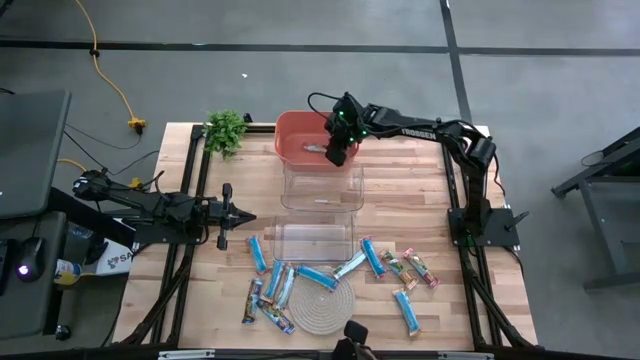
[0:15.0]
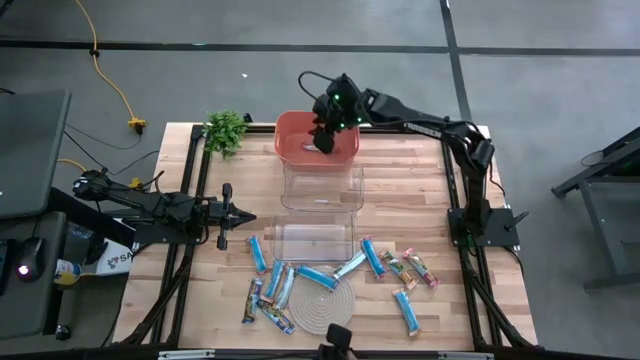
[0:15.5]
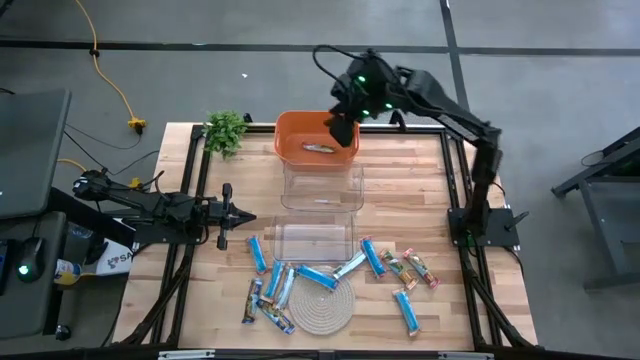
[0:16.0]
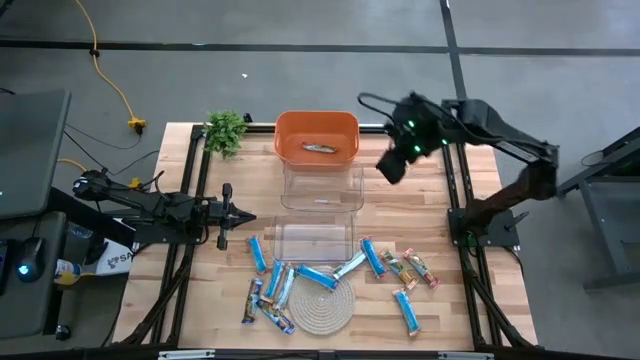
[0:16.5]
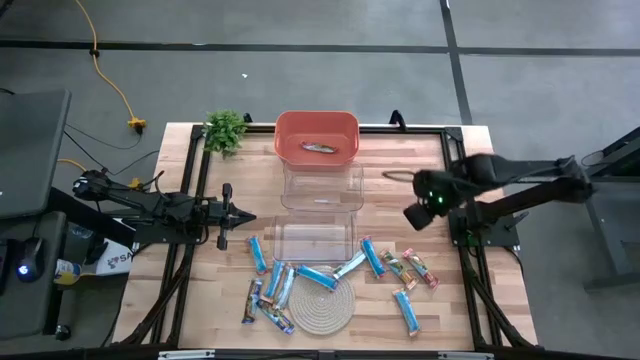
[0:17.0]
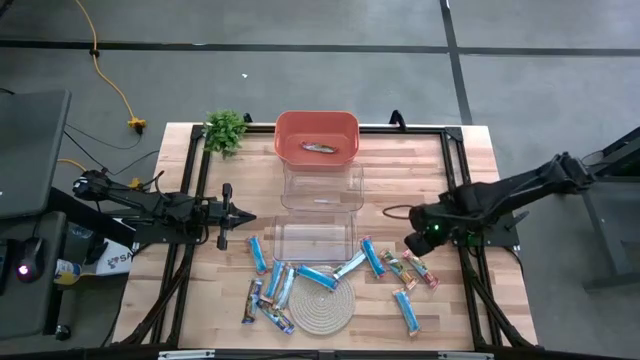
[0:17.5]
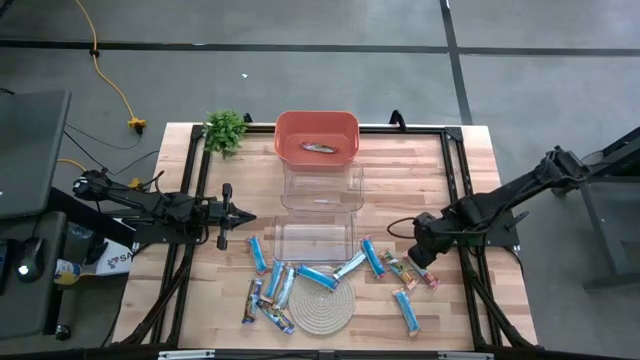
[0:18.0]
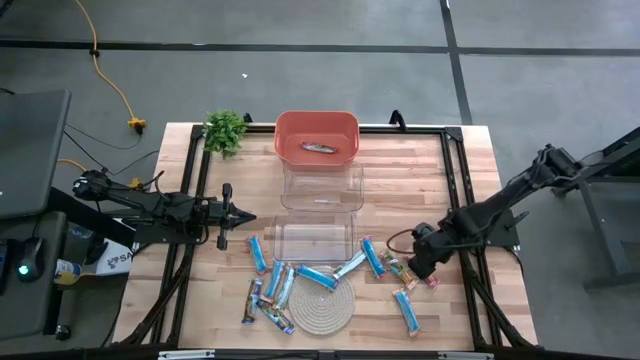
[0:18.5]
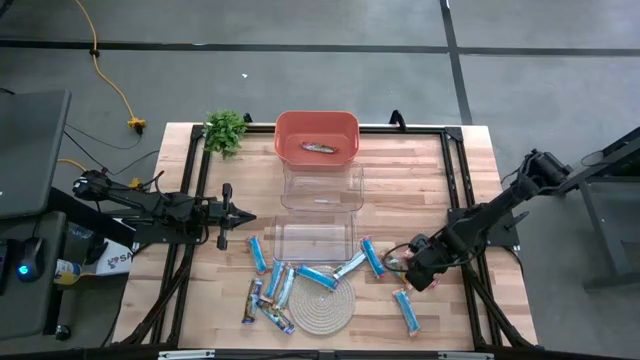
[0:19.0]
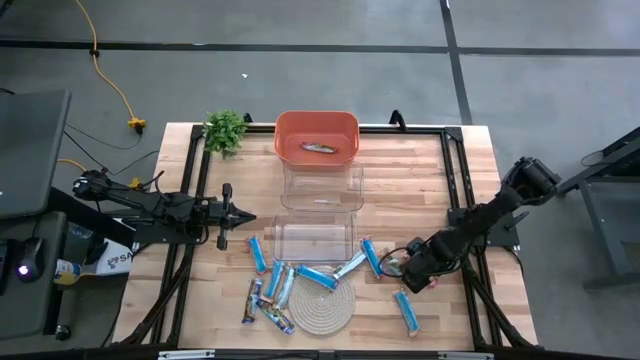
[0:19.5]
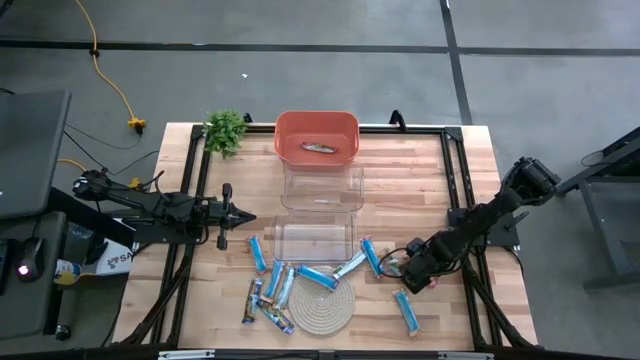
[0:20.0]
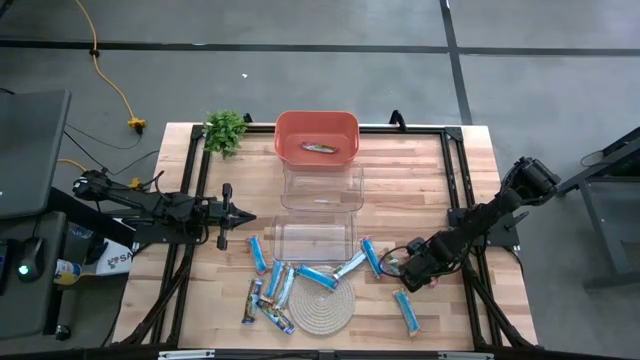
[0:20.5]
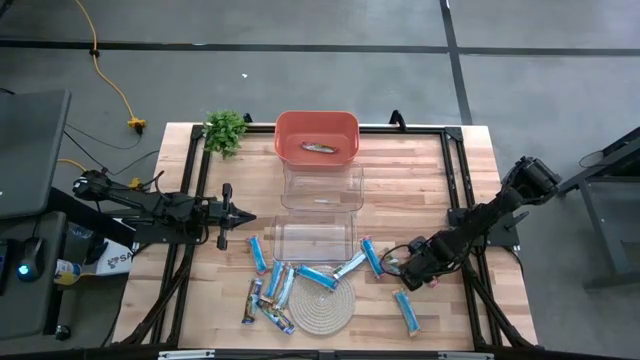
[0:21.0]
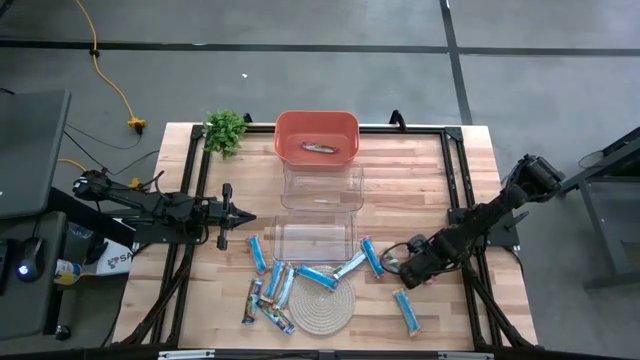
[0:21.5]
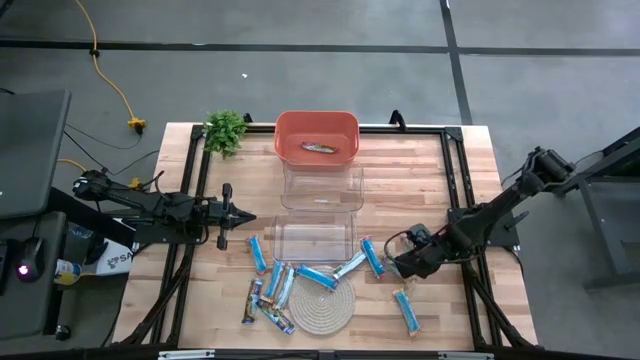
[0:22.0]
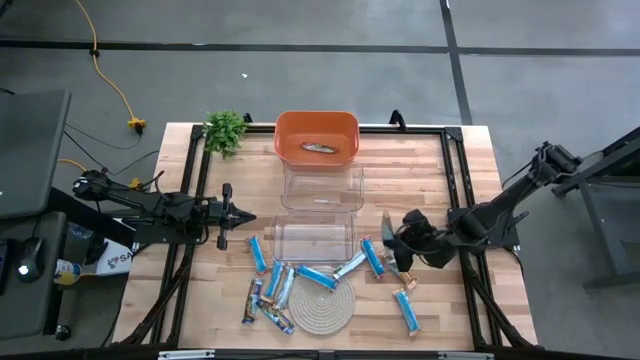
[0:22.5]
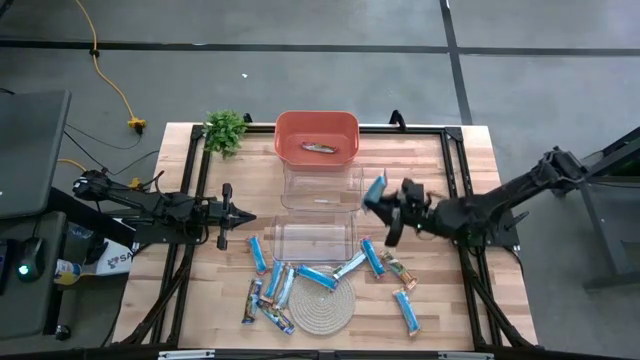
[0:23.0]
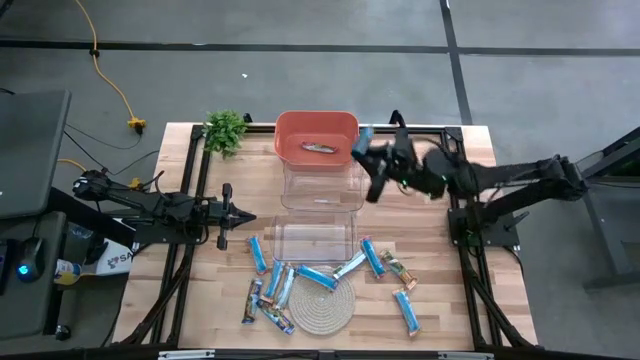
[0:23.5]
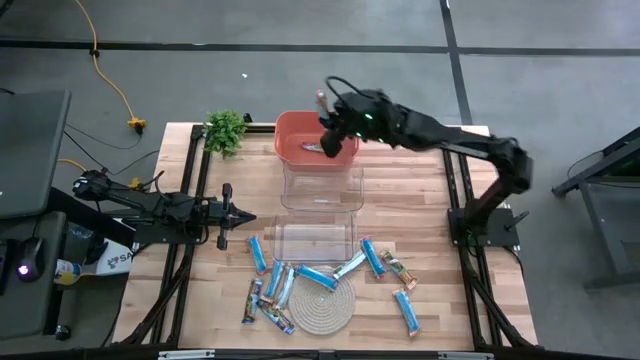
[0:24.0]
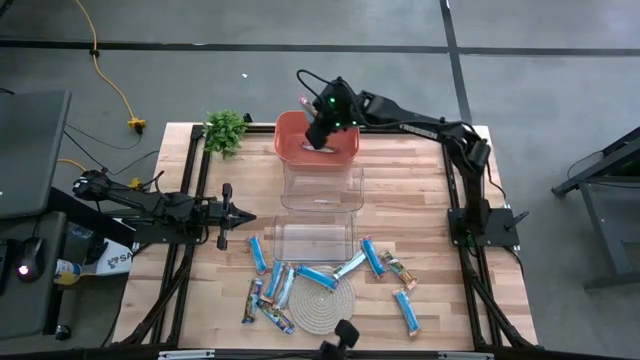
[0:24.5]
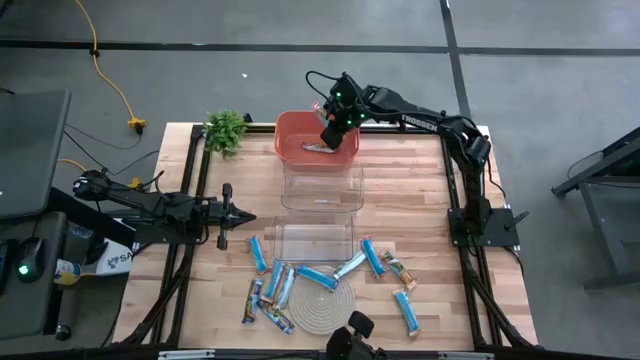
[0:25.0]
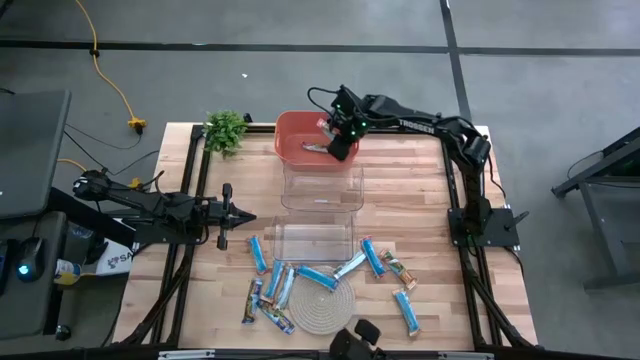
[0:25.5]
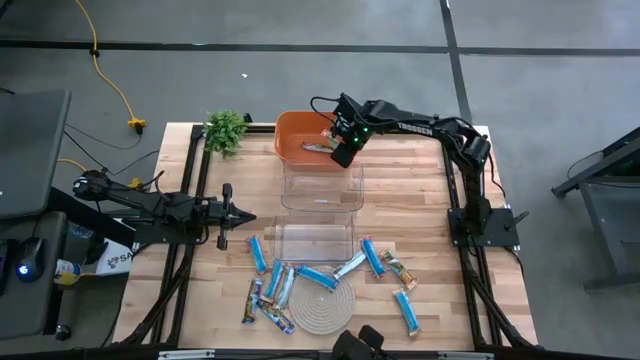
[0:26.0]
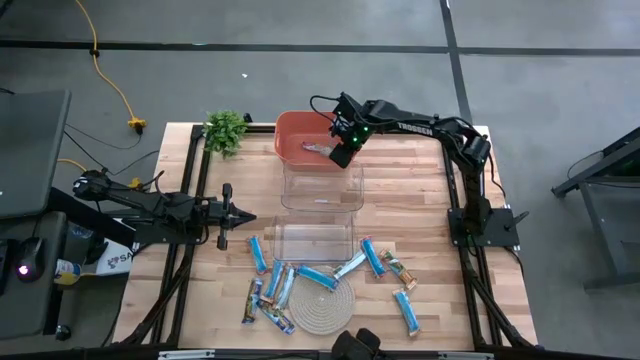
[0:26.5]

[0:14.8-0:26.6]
Task: Pick and place Granola Bars by type
Put the red granola bar into the orange bin

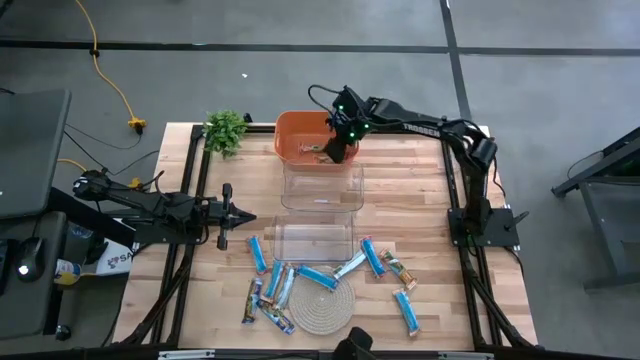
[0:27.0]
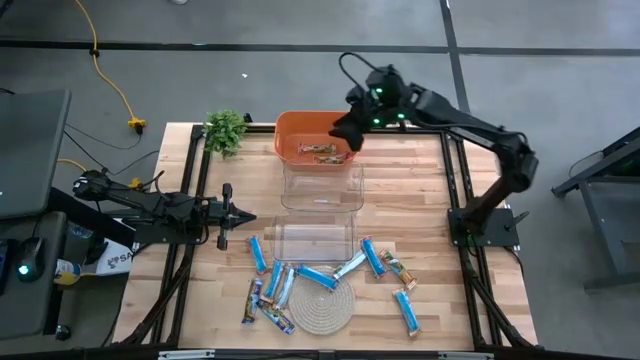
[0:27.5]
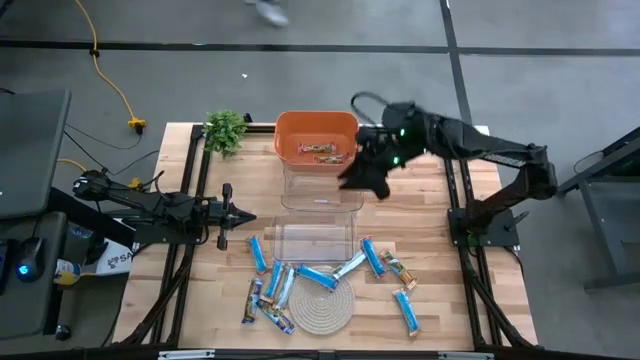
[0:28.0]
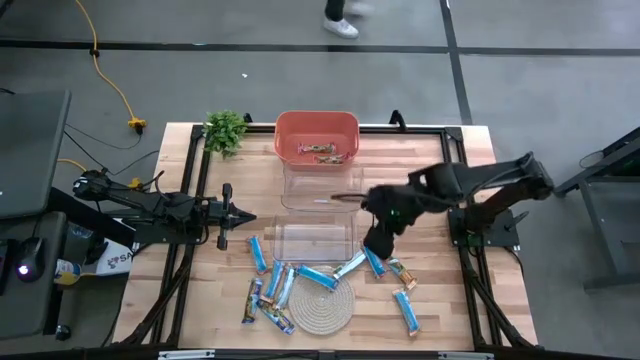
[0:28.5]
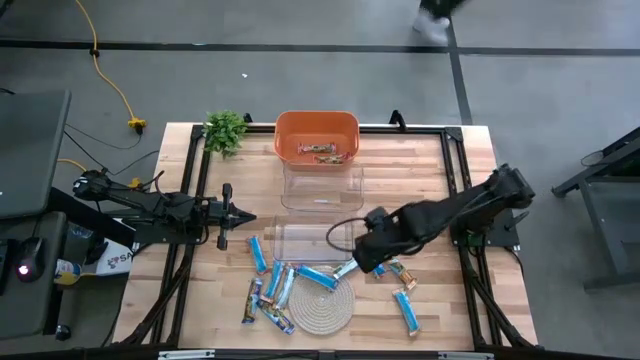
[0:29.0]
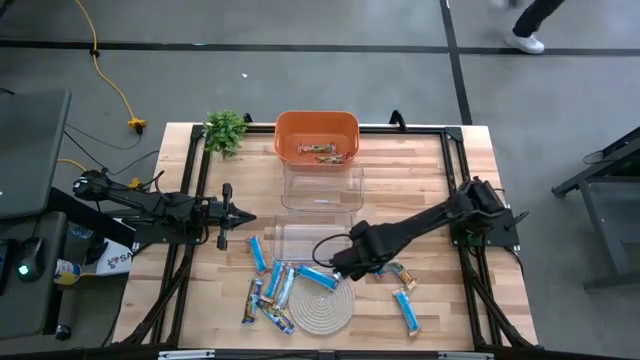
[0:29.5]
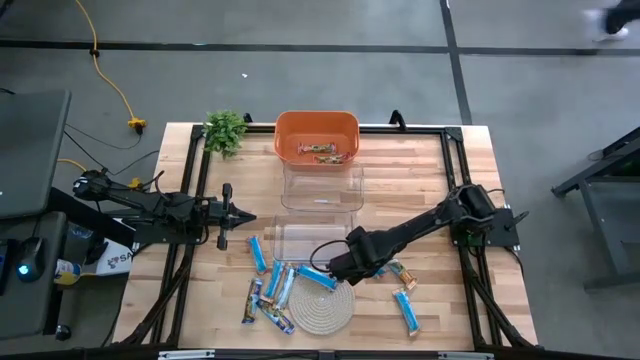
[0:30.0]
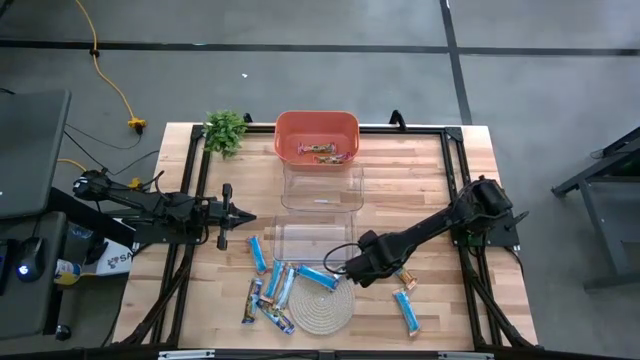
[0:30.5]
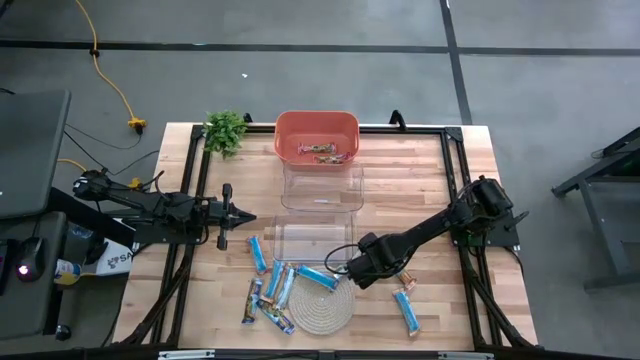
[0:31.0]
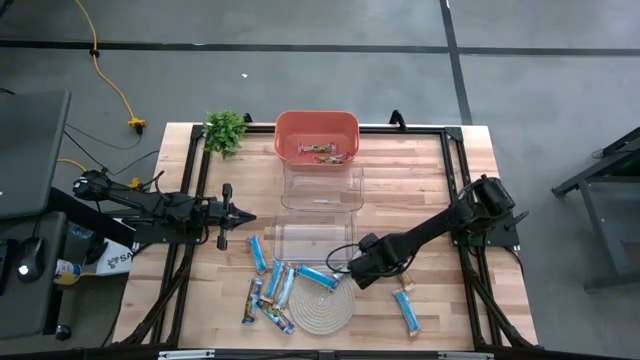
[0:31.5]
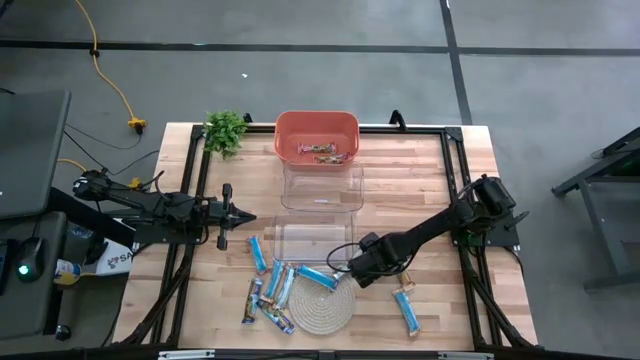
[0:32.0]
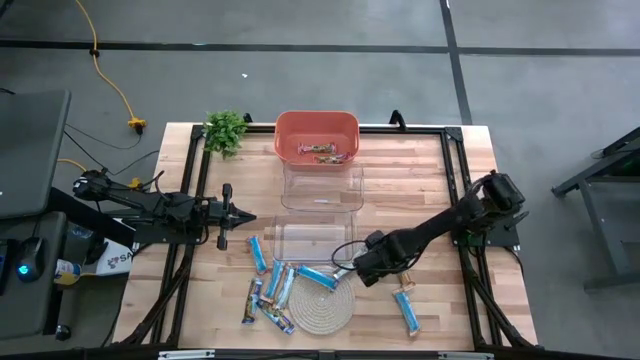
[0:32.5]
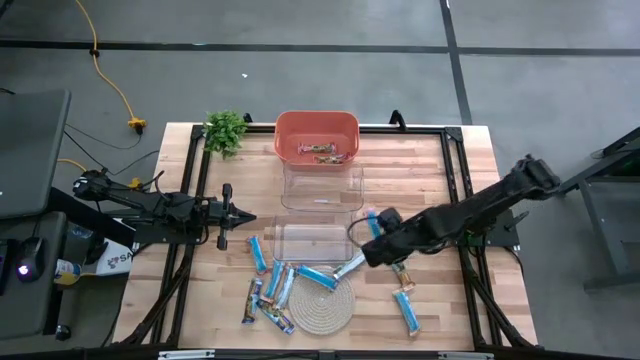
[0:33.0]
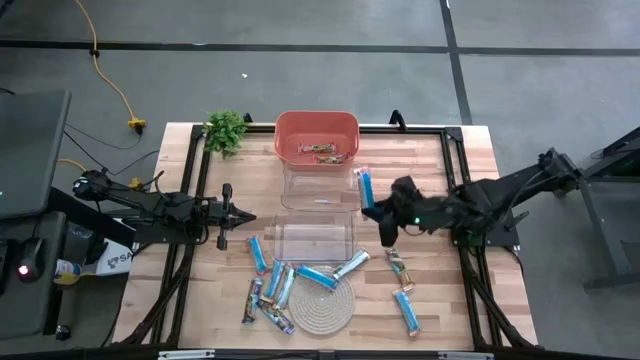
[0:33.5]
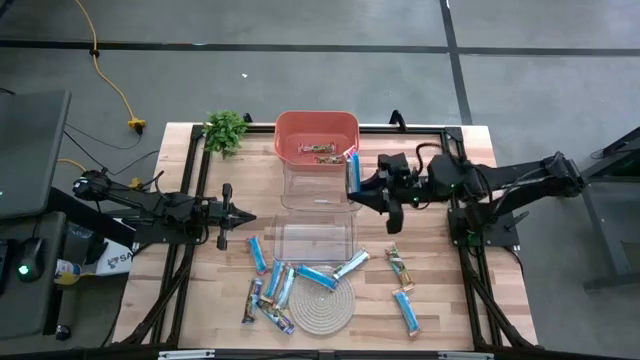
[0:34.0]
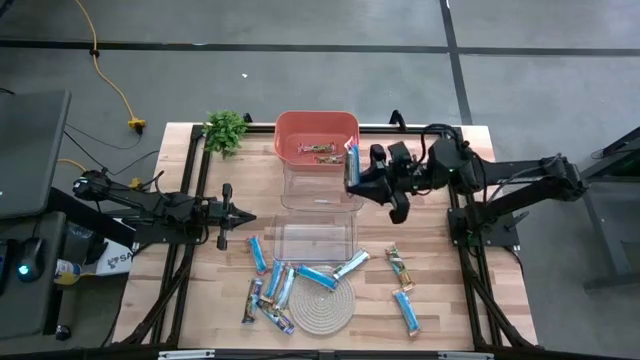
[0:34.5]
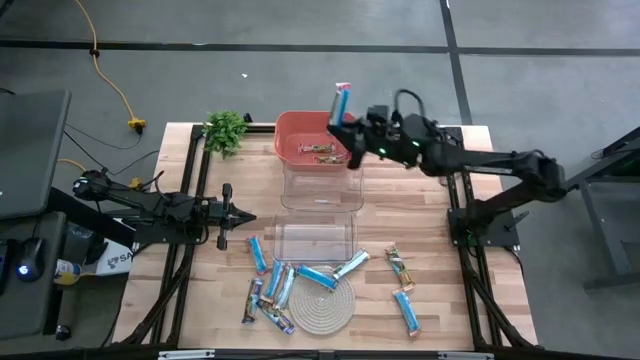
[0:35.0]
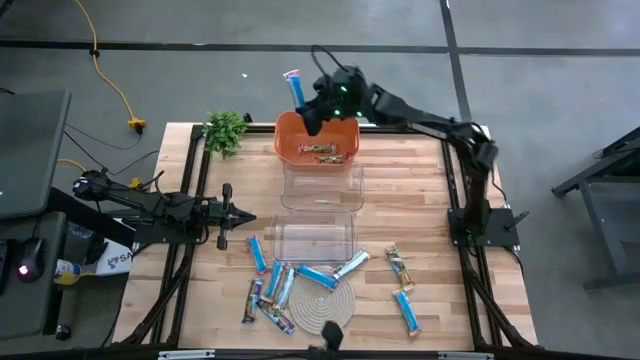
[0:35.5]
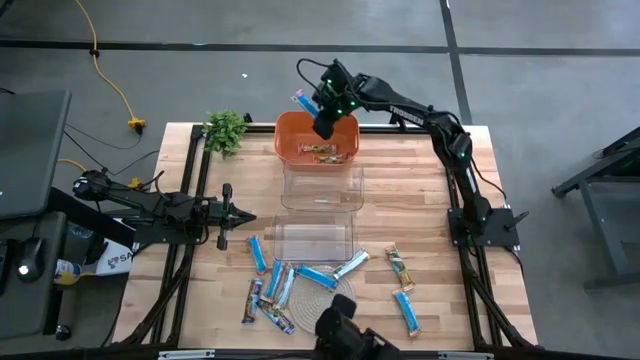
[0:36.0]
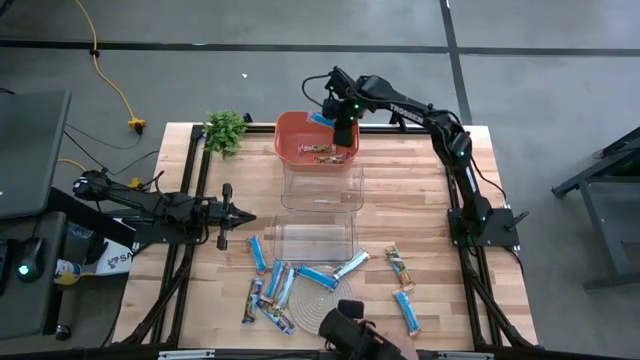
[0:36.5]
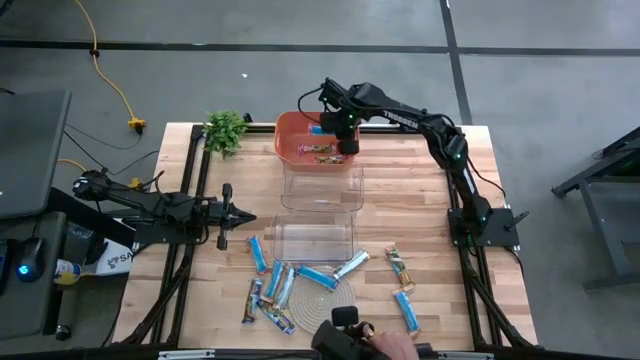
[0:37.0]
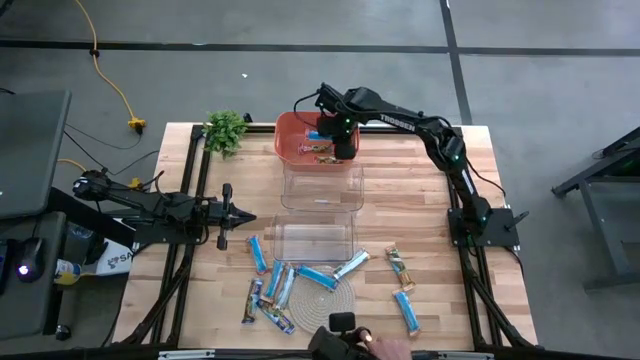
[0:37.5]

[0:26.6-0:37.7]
Put the red granola bar into the orange bin
